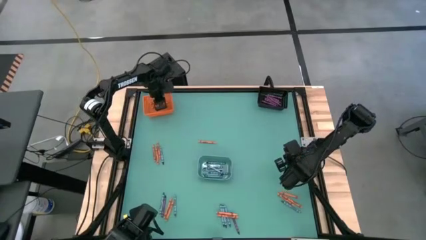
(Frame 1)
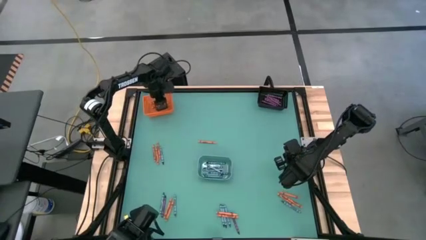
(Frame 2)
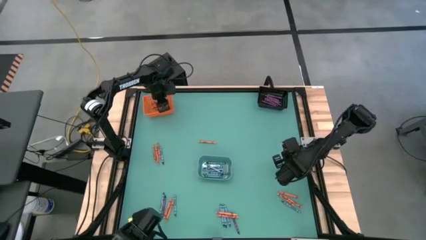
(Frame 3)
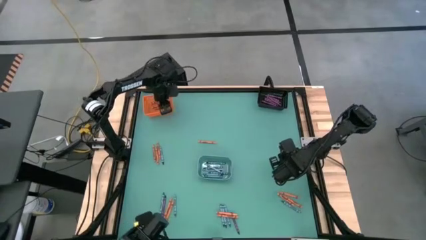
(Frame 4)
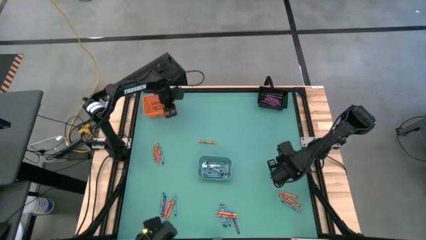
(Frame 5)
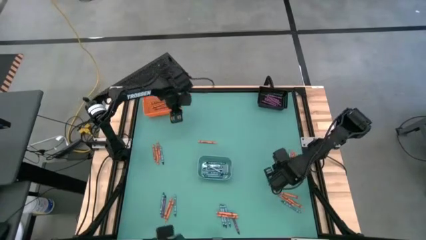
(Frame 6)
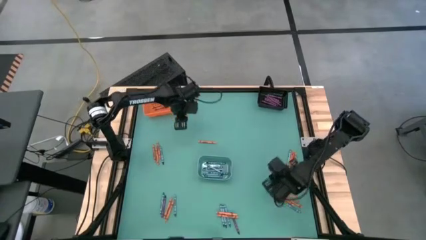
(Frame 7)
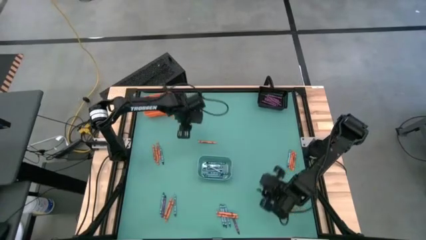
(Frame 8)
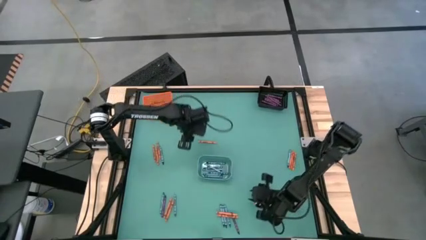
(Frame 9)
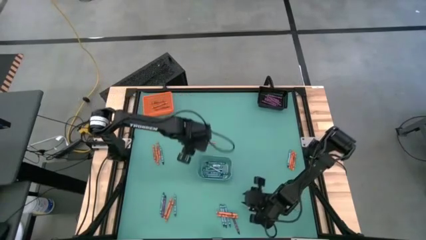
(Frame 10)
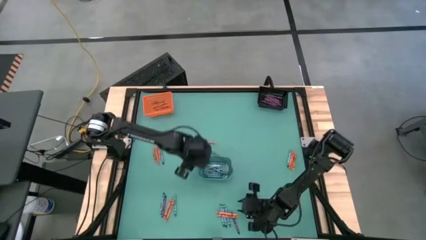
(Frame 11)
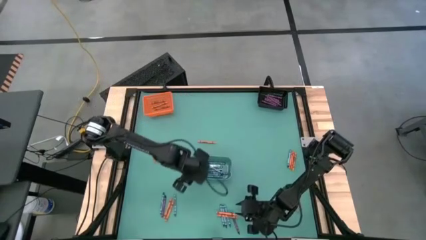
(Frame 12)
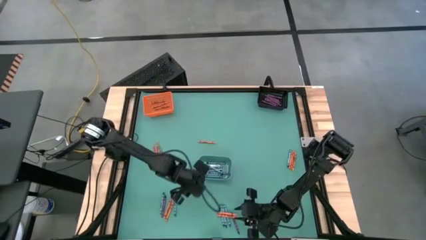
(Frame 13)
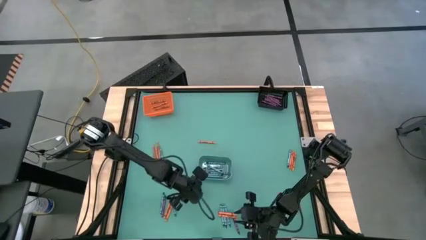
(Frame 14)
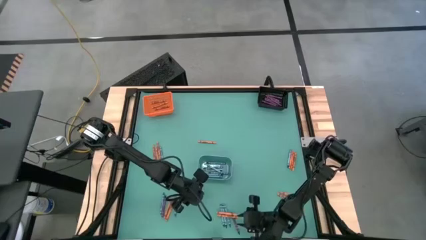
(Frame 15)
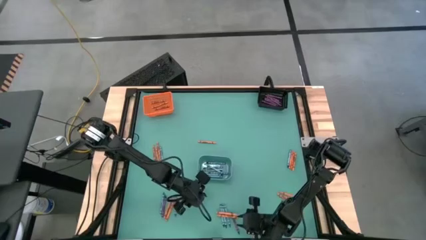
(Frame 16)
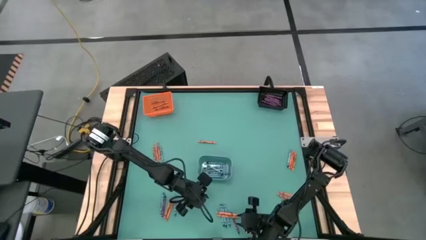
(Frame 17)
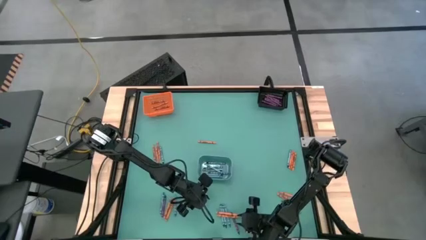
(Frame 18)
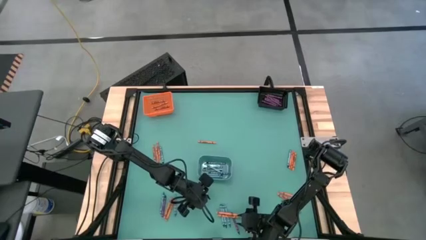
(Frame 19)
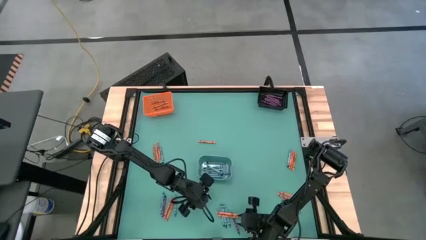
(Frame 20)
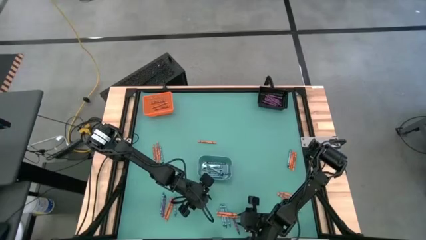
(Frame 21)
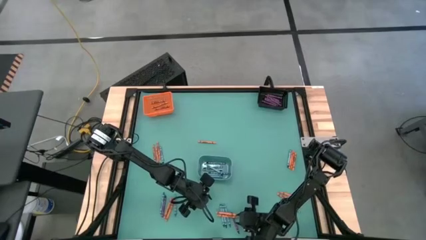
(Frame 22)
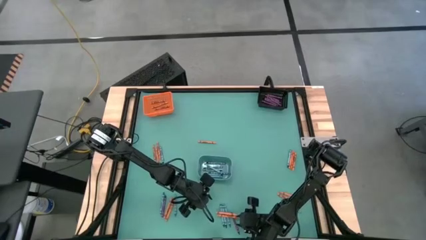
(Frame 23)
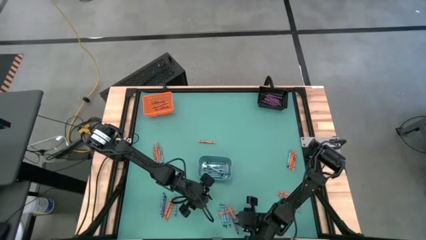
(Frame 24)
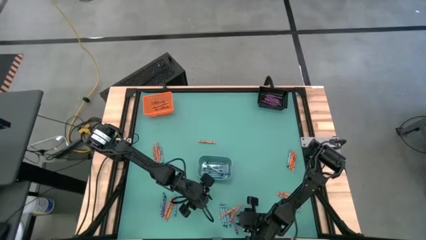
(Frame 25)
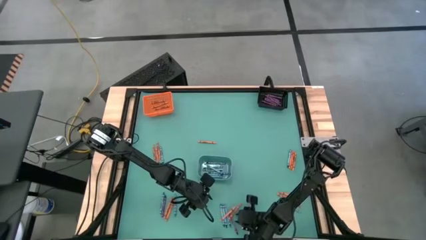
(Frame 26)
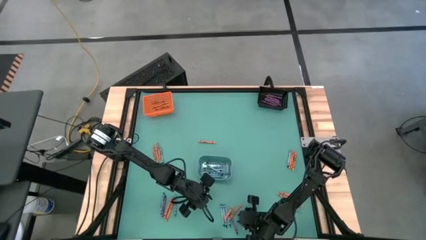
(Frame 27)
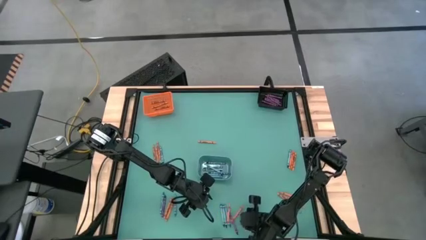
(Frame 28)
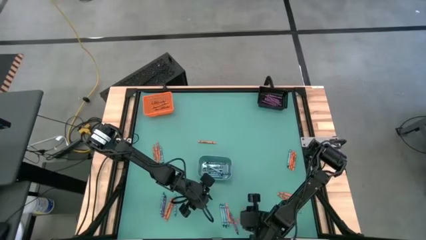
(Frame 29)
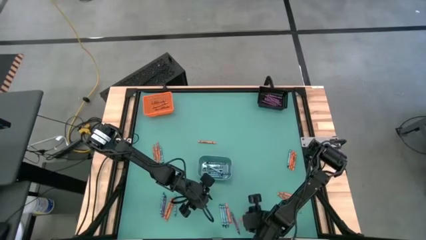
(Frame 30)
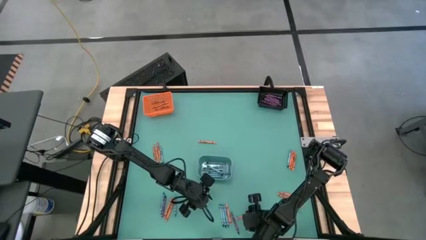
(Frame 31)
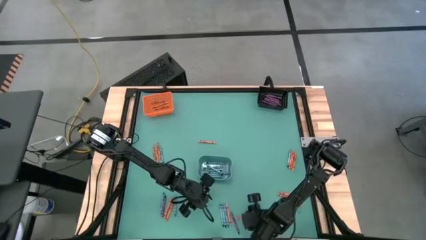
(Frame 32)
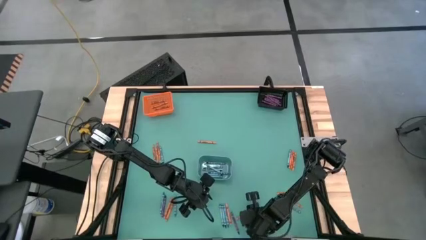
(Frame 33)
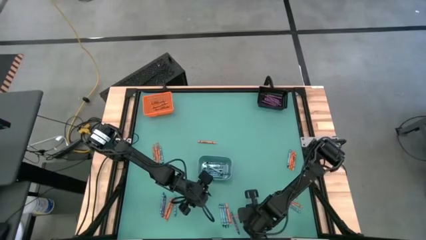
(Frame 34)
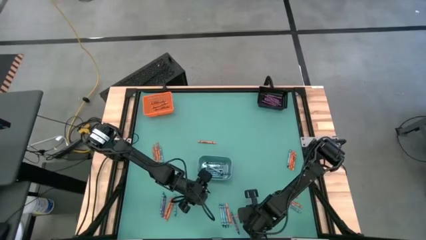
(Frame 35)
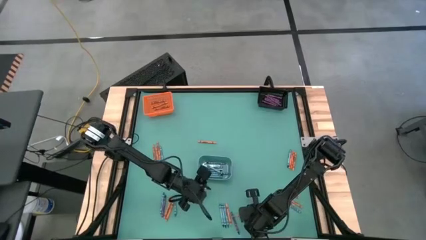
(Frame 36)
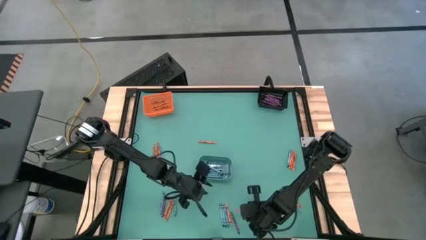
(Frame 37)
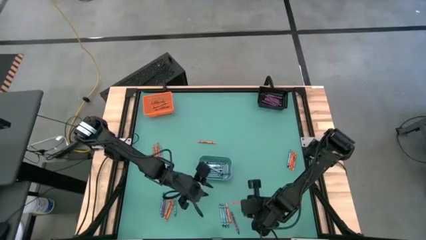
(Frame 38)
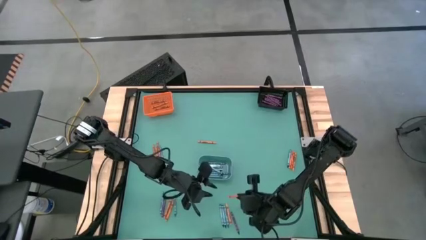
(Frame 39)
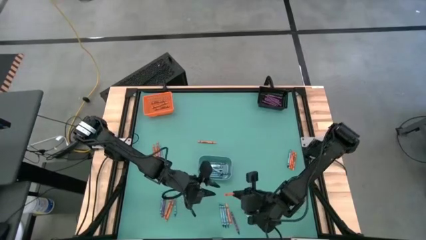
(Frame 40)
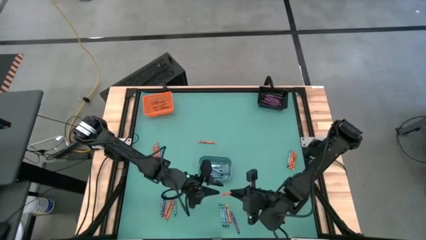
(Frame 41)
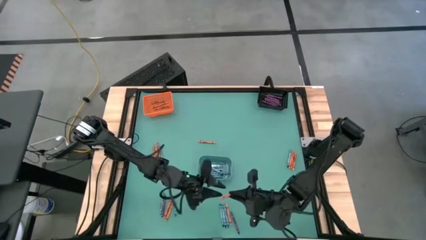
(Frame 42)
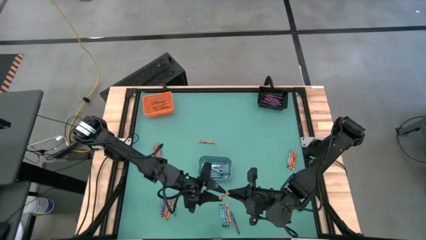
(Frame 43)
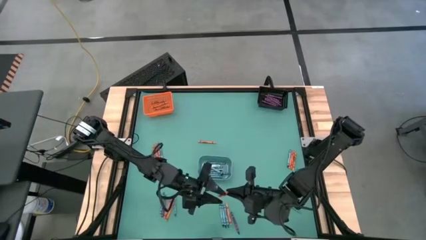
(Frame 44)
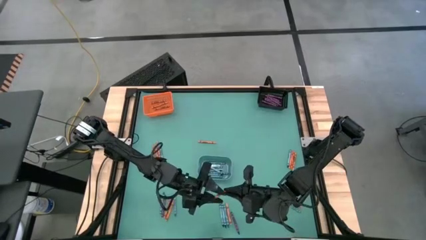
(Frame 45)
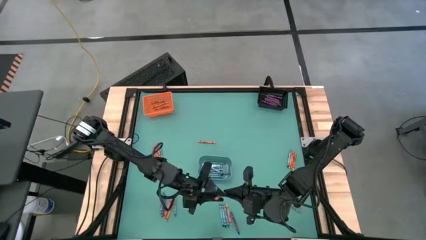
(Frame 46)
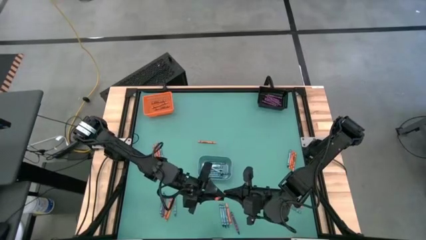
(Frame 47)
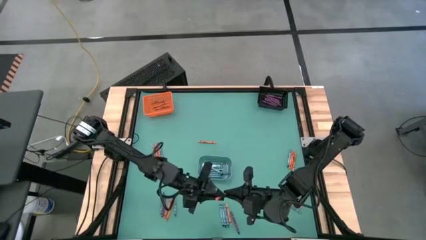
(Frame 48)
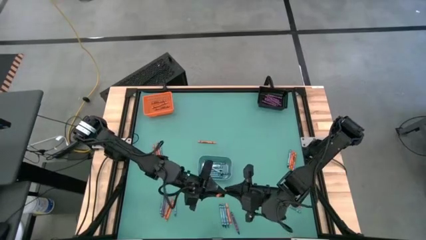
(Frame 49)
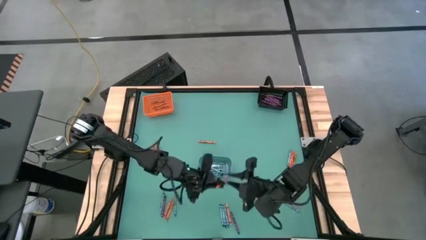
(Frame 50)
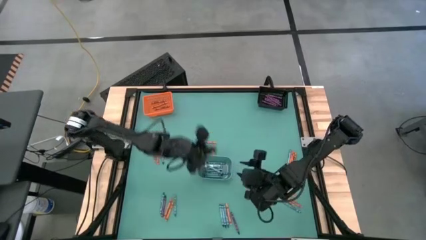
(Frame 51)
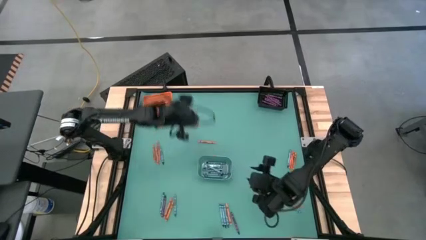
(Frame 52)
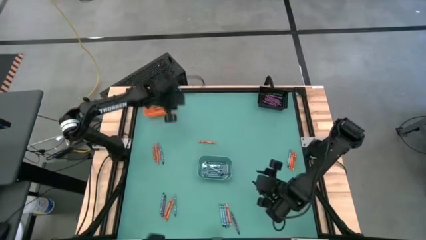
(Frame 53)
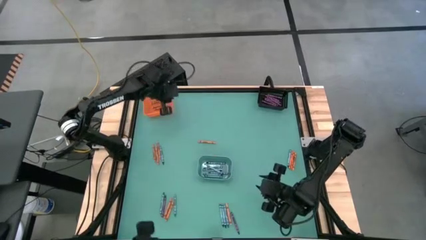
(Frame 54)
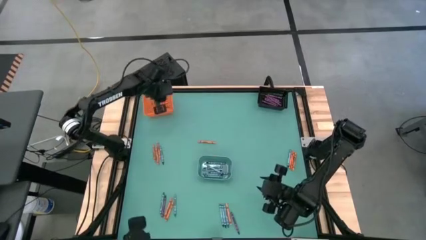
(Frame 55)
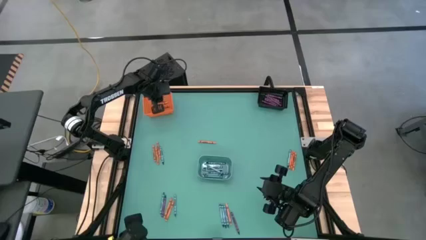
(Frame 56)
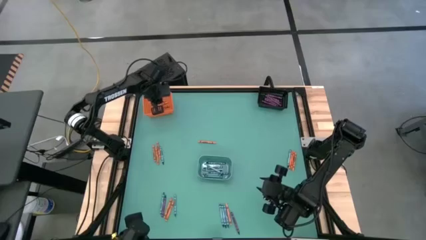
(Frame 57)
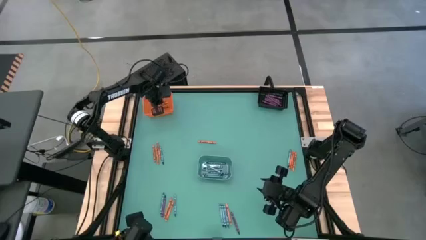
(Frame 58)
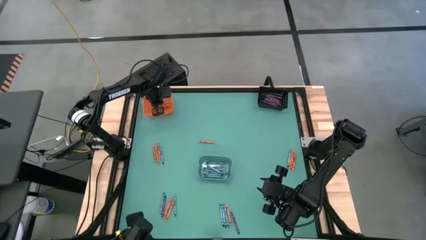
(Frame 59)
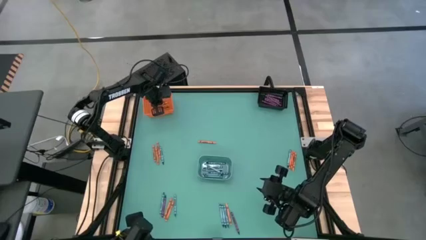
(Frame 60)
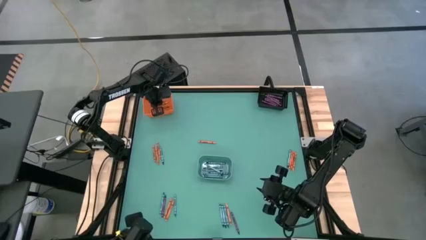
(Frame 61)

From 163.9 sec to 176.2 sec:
Task: Sort crayons
Put the orange crayon into the orange bin

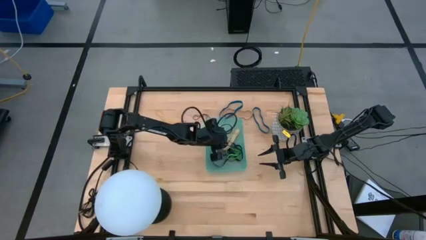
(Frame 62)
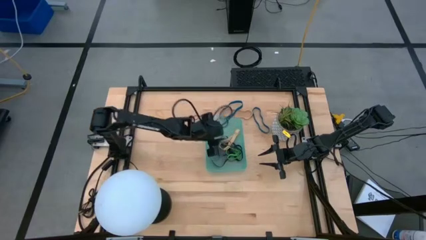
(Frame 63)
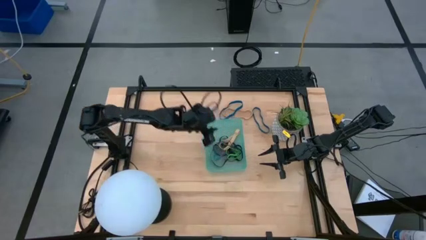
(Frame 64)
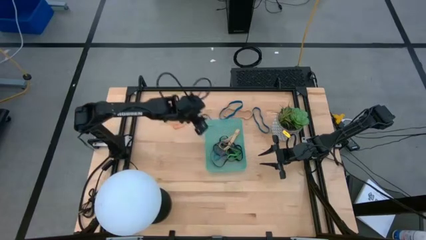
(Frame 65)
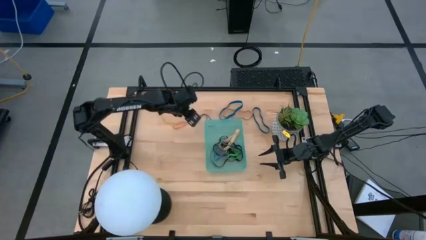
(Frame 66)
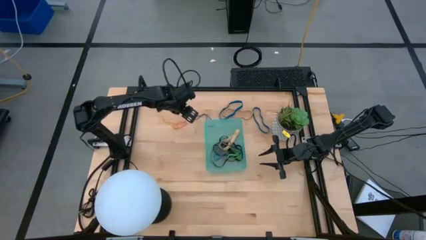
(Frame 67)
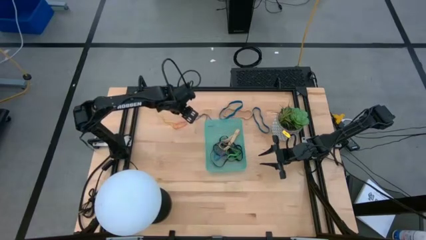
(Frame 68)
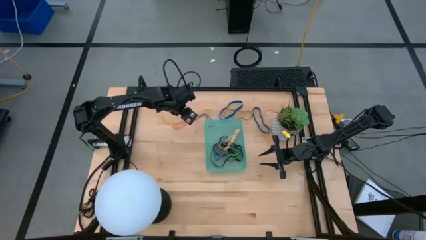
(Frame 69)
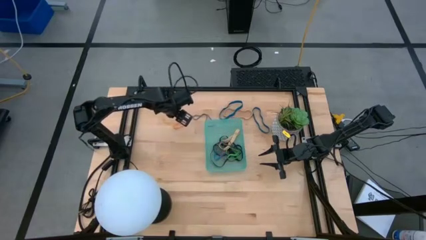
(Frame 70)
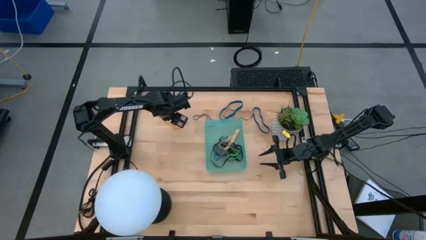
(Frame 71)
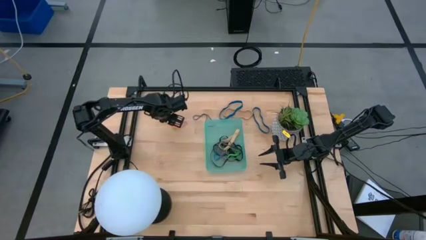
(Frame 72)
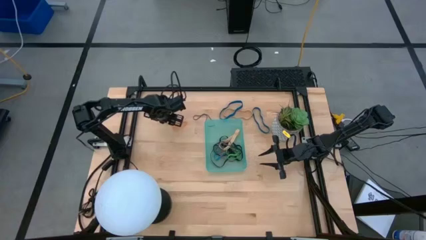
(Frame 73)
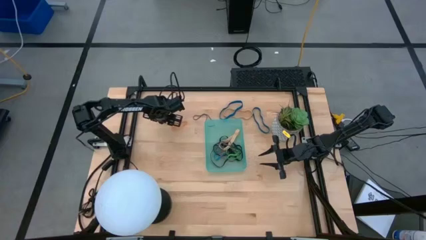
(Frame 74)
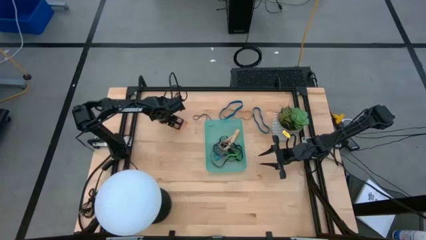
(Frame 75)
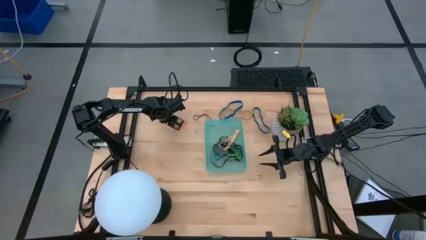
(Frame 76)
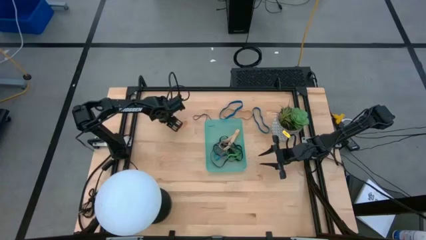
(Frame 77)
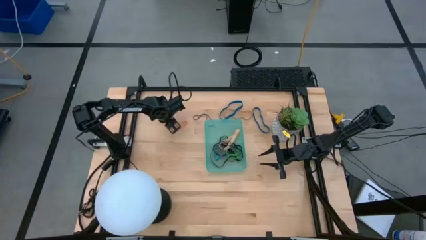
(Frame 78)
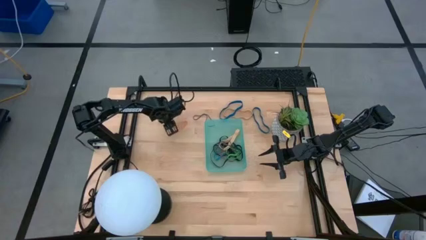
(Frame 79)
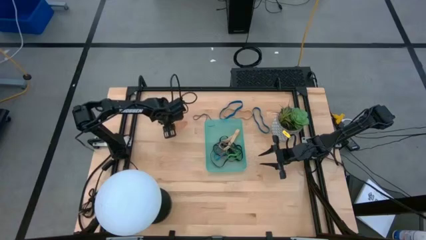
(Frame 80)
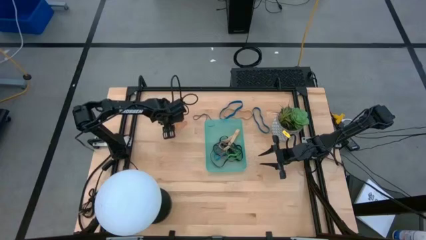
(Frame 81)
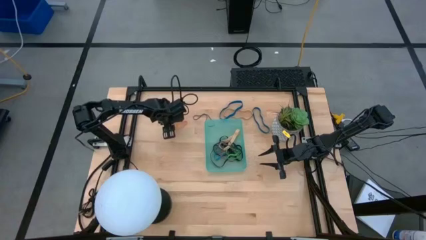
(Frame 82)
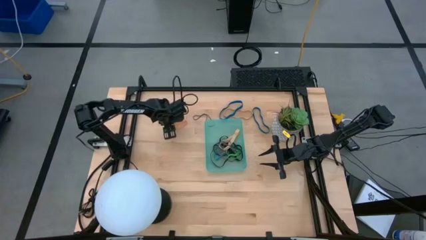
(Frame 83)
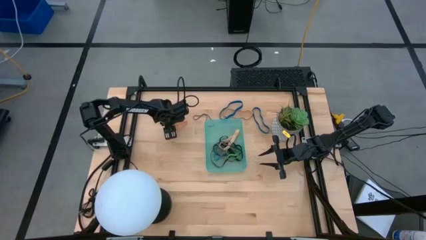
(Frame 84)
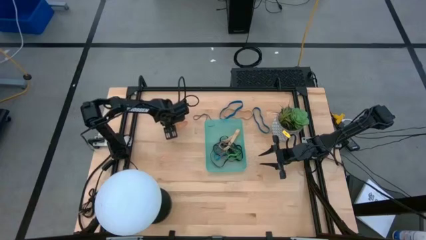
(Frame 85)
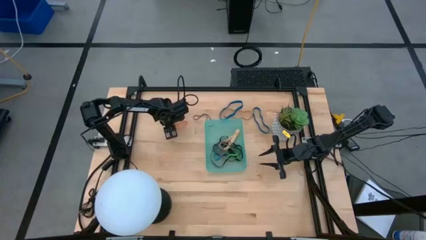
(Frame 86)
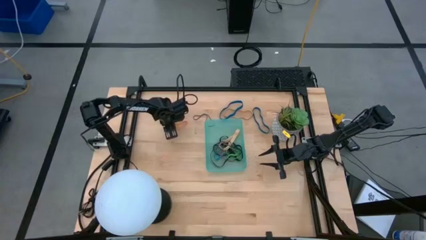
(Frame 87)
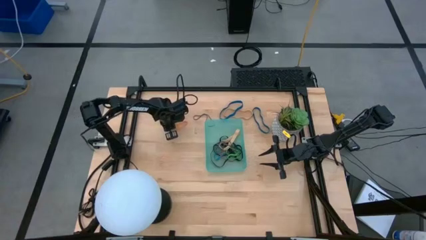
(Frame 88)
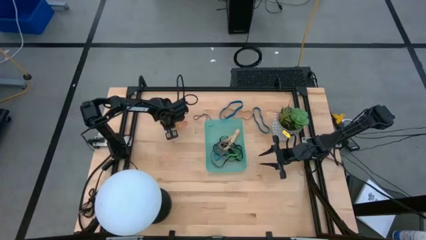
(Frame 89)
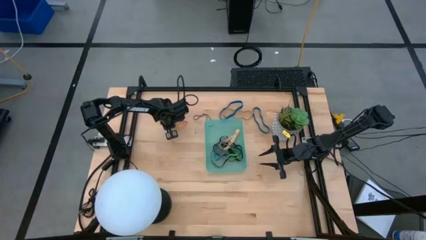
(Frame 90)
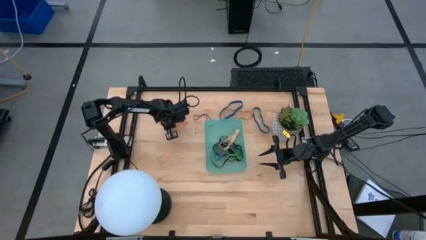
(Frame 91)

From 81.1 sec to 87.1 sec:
Task: Pick and place rubber bands into bin
Put the yellow rubber band into the green bin
